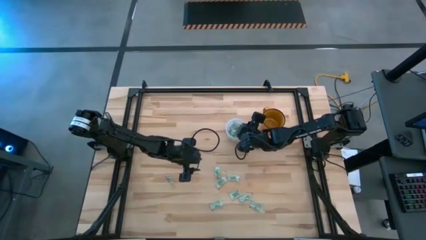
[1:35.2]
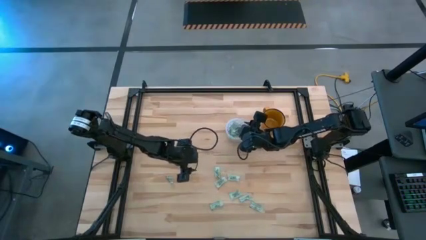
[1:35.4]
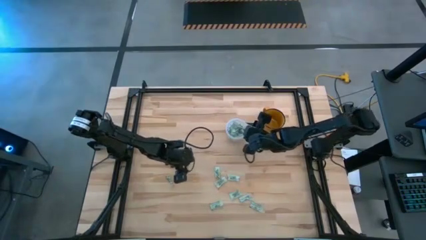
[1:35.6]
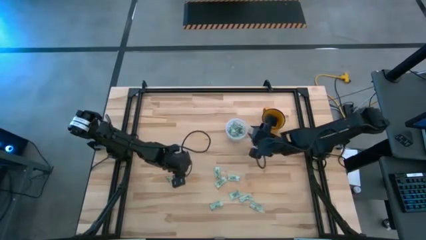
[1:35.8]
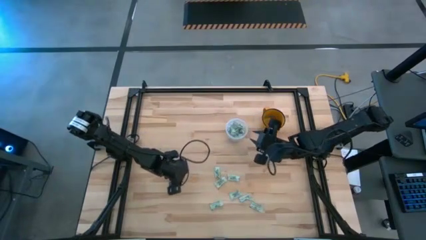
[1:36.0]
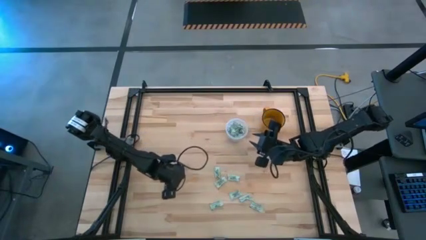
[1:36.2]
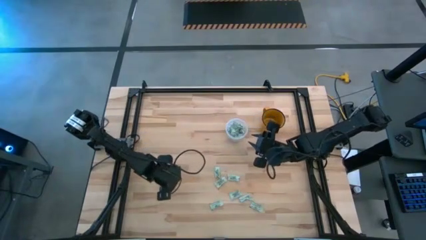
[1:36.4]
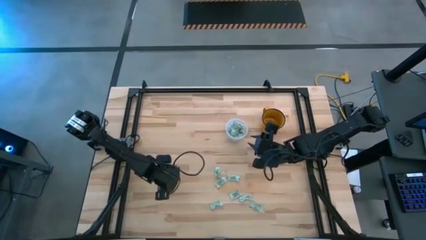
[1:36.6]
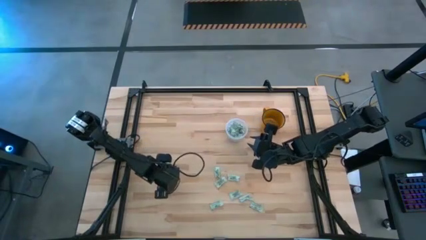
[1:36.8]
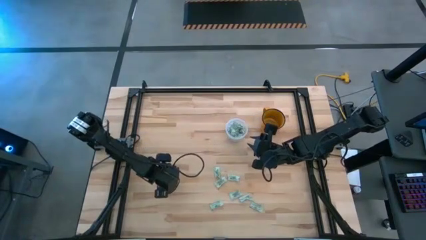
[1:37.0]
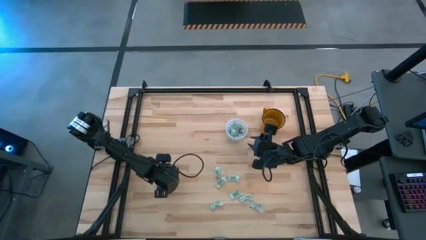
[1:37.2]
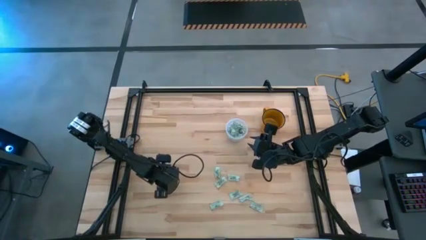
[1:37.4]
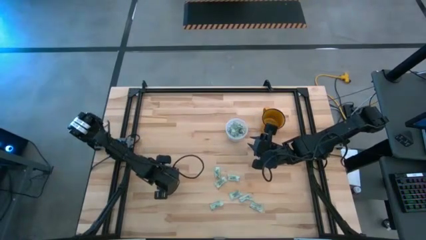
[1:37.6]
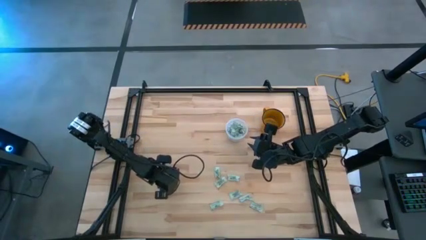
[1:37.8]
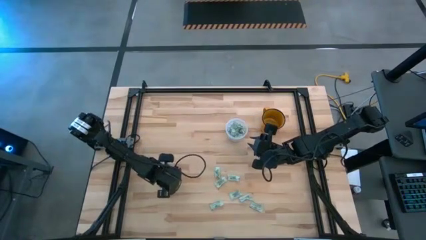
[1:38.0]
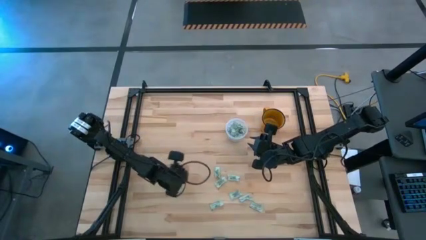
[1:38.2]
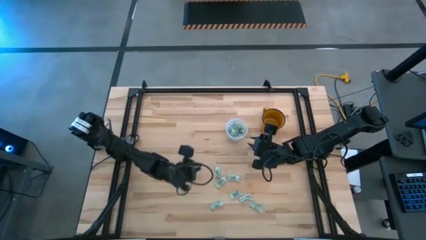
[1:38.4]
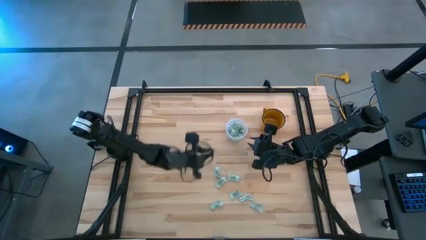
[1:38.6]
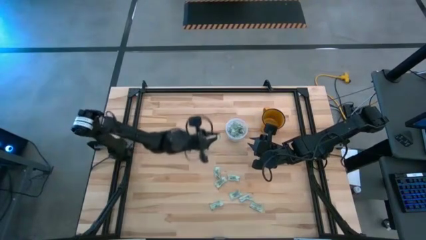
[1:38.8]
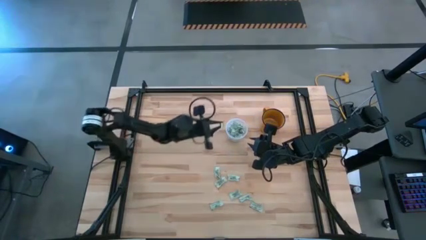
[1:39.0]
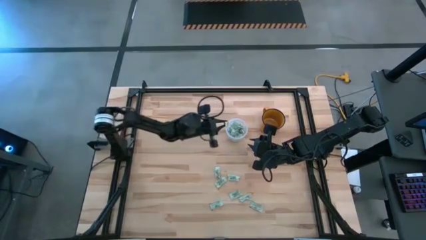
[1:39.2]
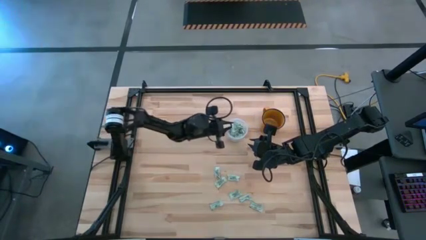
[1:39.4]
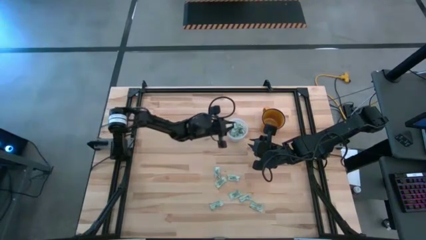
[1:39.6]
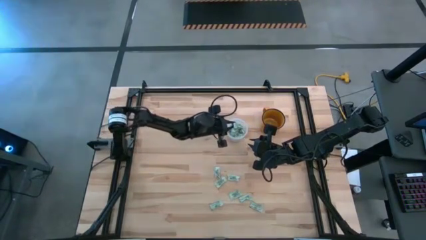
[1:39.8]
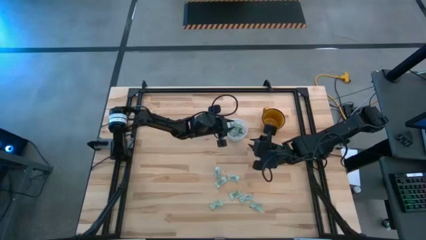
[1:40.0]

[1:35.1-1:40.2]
Task: Pick and place Stevia / Truvia into bins
Put the green stevia packet into the transparent bin

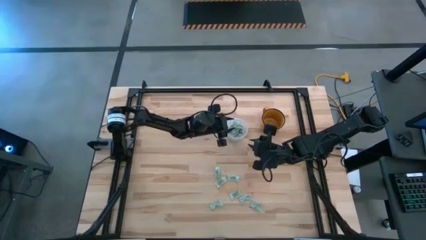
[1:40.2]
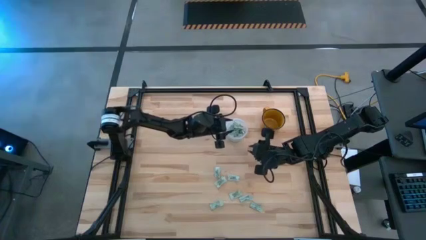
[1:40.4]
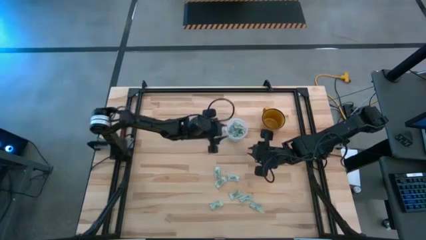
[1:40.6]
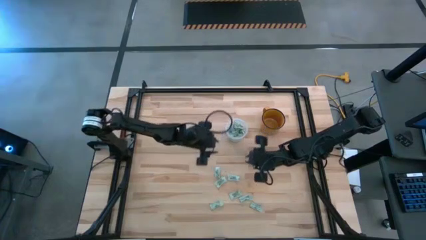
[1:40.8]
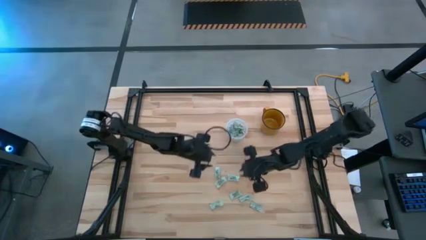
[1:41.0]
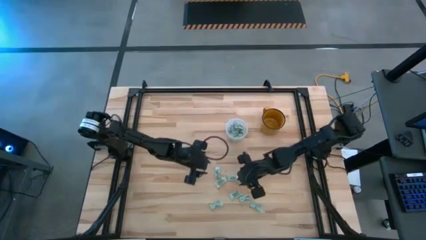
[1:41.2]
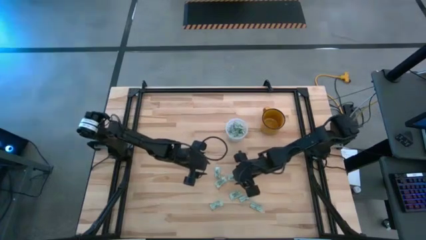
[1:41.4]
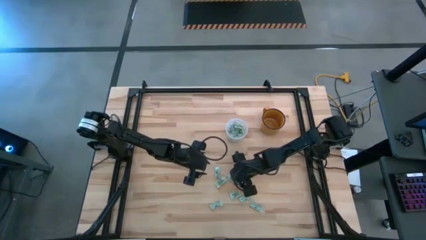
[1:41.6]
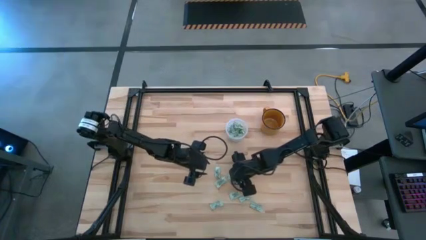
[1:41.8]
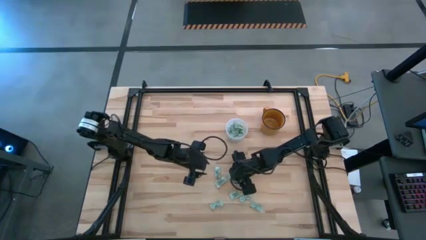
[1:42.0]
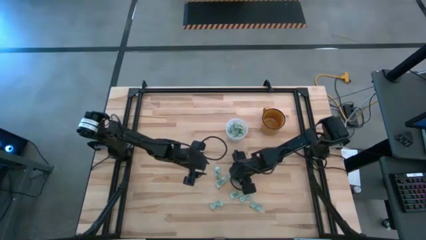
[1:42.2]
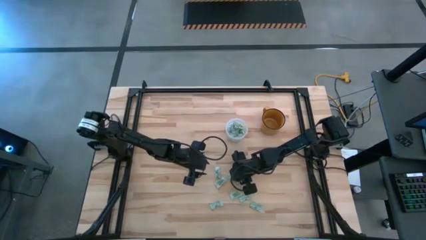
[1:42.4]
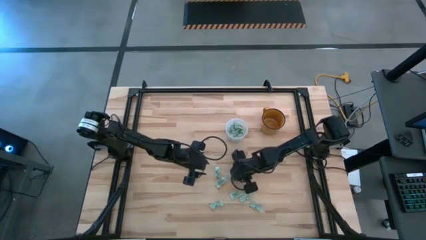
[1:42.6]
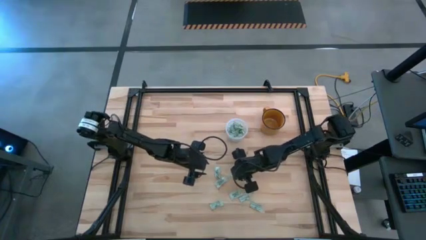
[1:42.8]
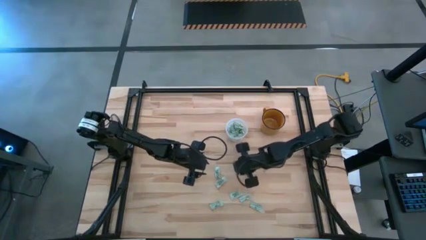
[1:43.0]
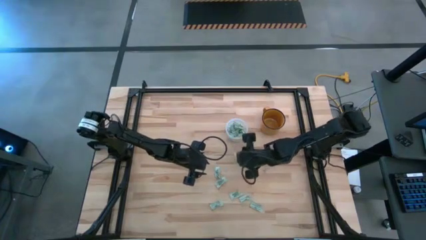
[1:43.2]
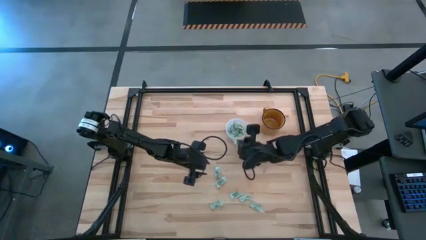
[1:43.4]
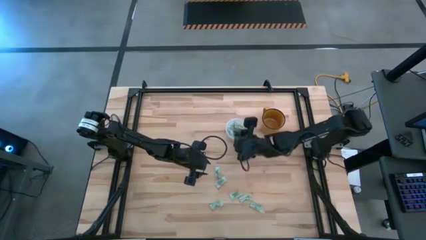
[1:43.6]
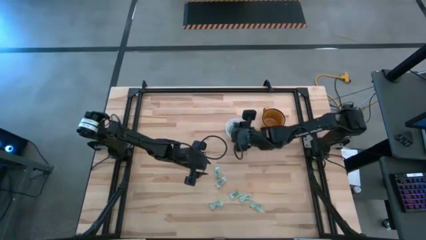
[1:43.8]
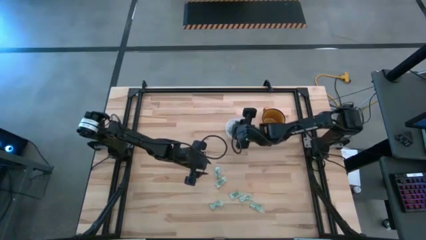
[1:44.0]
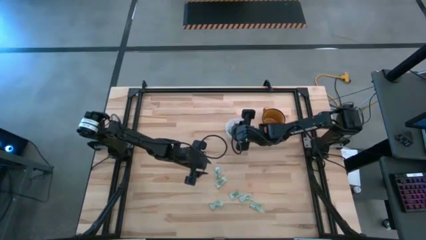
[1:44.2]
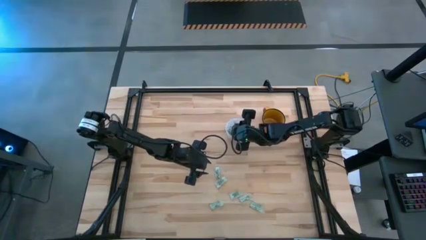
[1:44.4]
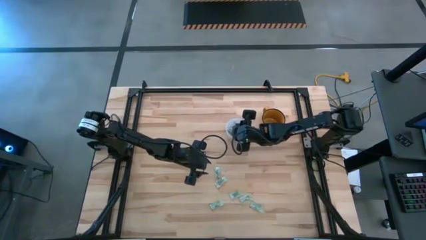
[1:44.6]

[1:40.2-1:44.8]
Put the green stevia packet into the transparent bin

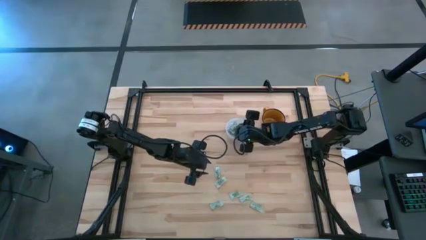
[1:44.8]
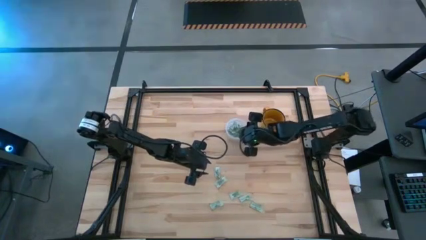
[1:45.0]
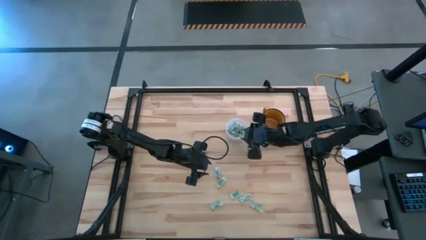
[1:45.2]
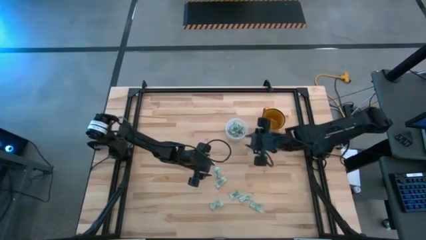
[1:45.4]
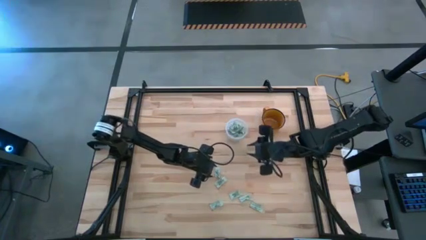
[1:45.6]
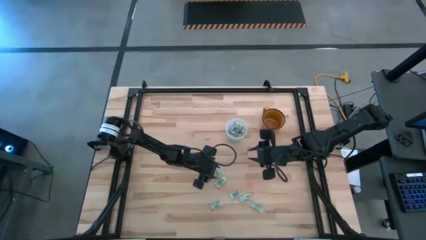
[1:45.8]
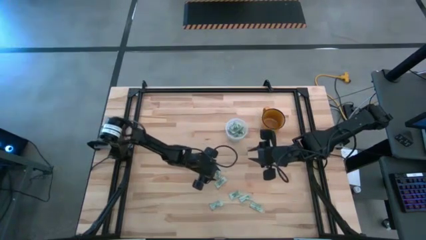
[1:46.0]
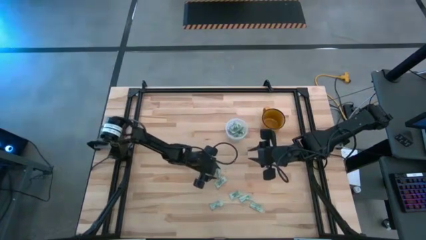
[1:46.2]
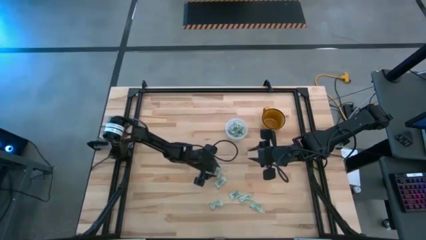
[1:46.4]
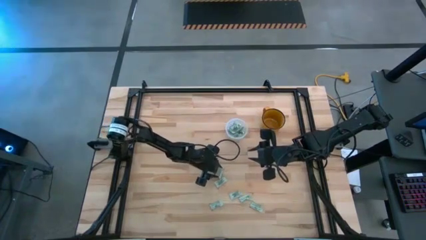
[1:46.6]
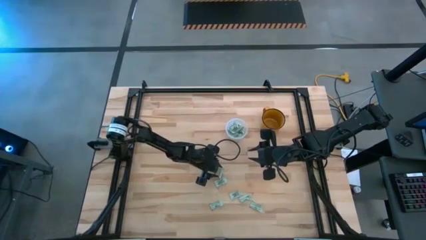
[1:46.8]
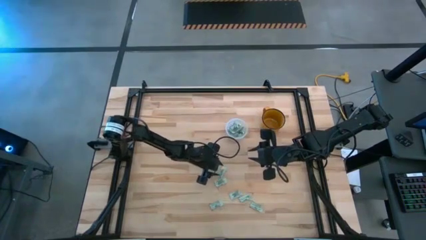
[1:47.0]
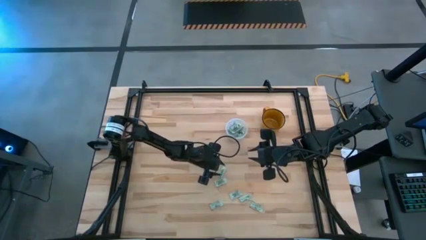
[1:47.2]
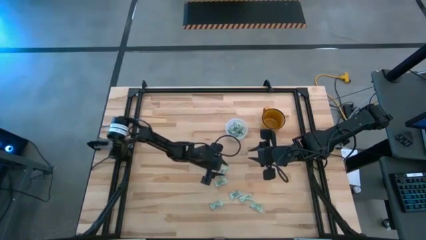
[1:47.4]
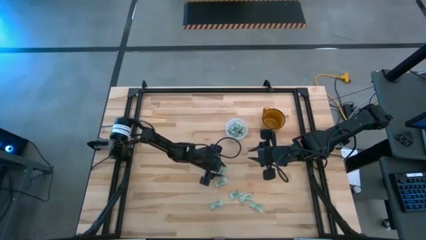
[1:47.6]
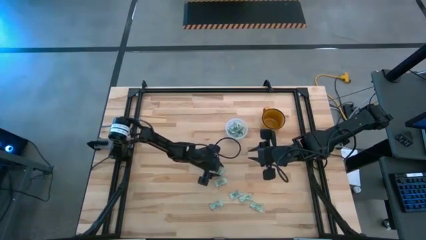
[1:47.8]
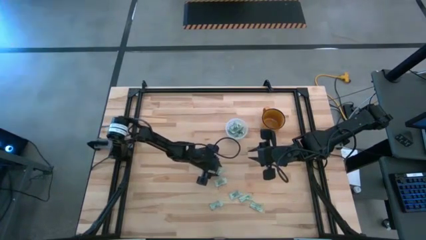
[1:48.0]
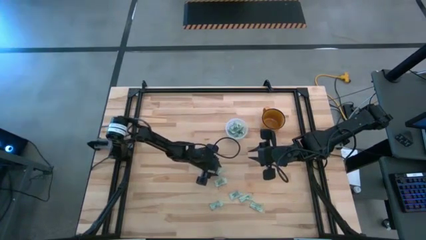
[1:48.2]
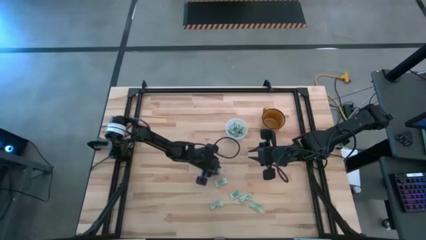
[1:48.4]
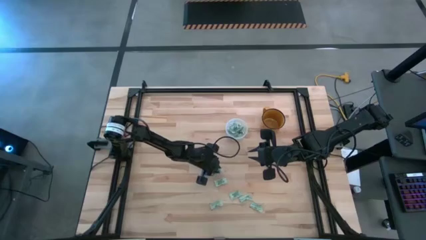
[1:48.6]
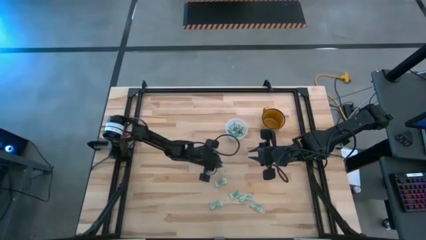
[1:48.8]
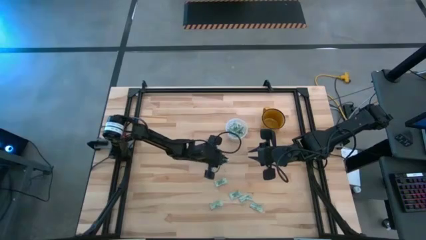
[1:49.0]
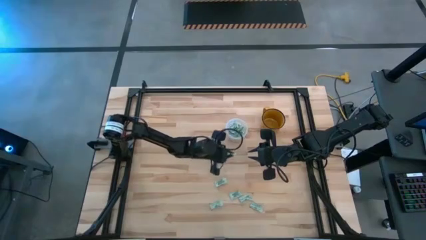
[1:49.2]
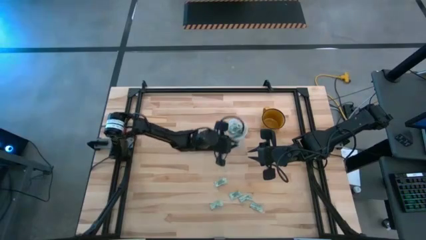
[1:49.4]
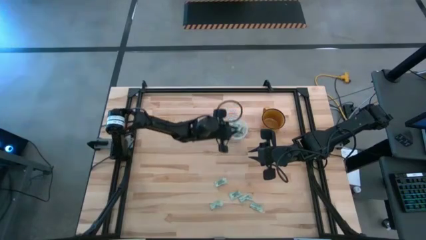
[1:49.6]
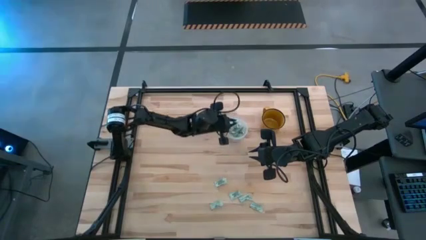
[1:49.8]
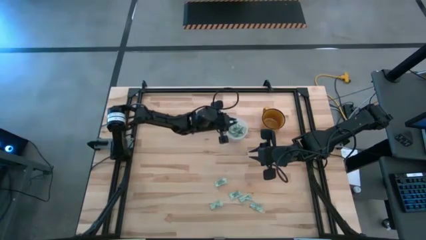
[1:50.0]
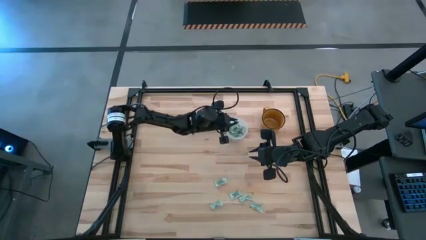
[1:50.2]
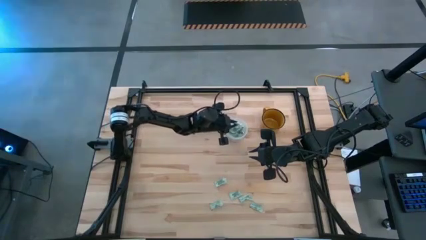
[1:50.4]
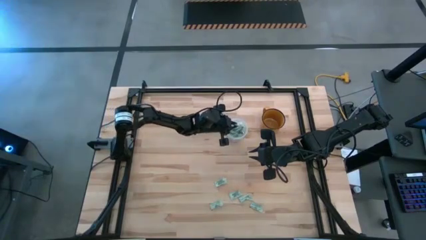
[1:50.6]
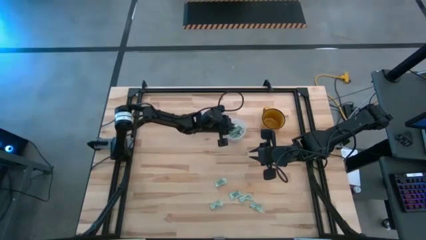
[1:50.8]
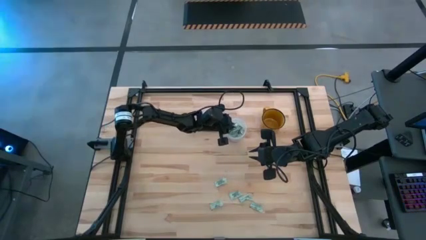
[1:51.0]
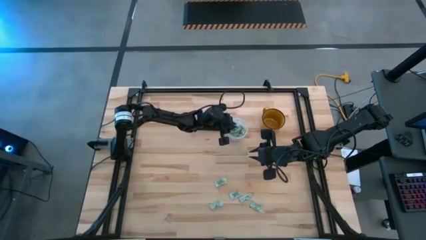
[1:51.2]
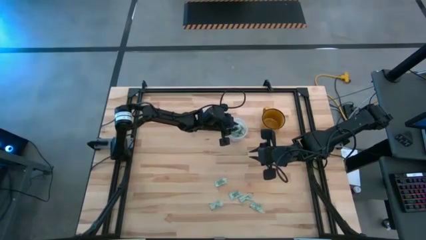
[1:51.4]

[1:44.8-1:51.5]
Put the green stevia packet into the transparent bin
